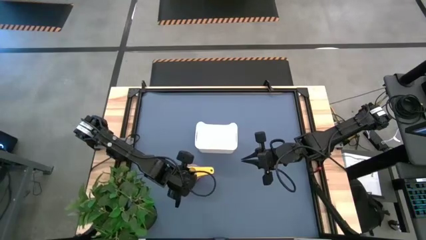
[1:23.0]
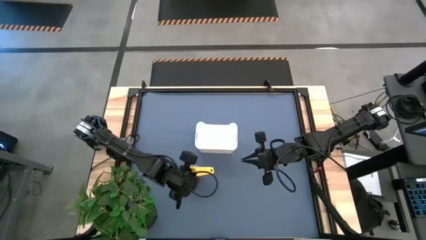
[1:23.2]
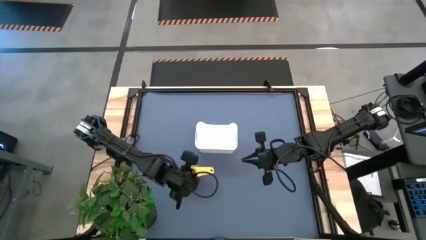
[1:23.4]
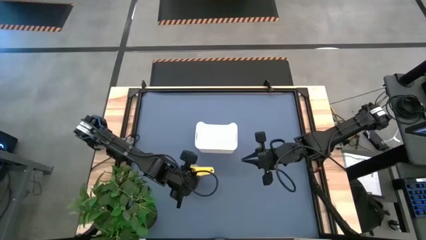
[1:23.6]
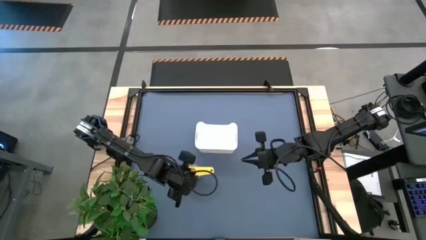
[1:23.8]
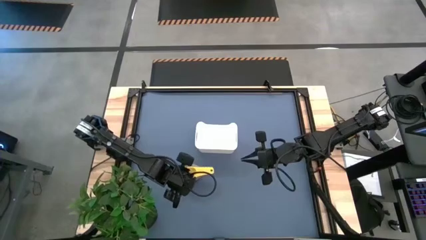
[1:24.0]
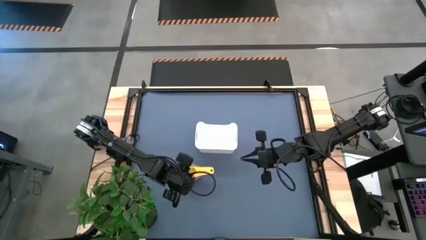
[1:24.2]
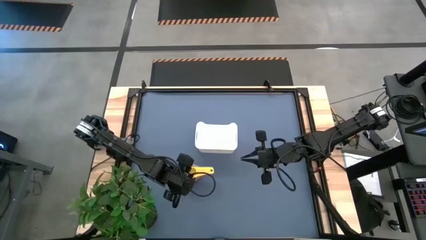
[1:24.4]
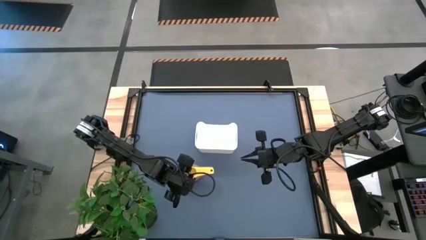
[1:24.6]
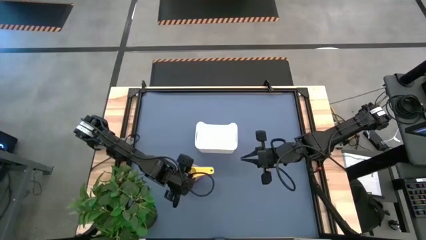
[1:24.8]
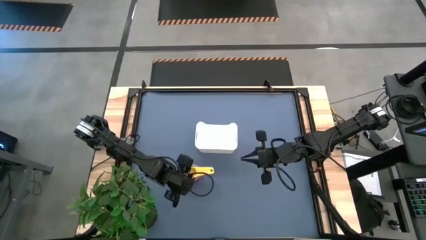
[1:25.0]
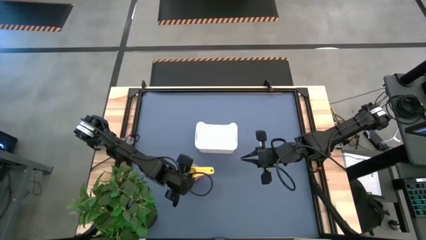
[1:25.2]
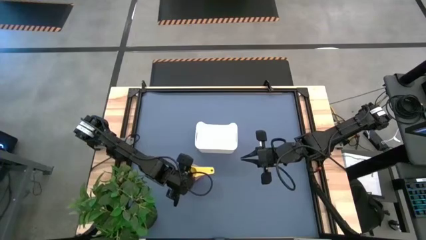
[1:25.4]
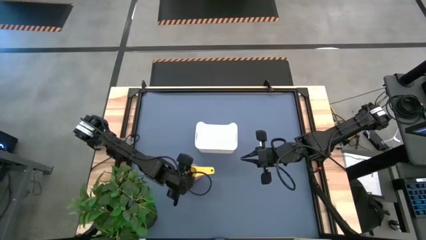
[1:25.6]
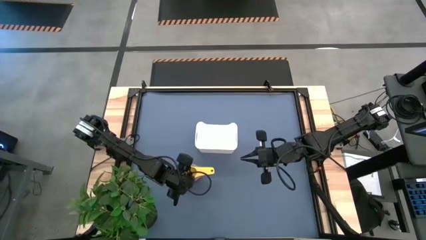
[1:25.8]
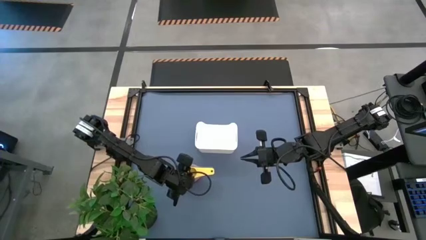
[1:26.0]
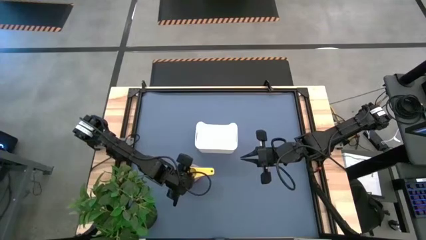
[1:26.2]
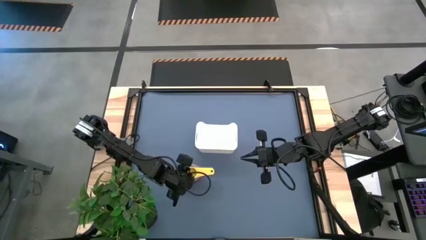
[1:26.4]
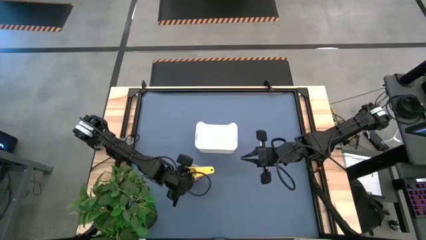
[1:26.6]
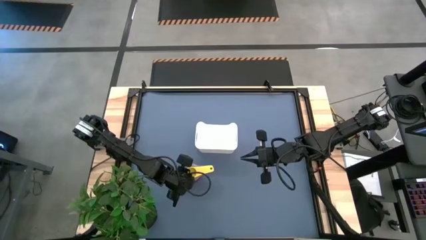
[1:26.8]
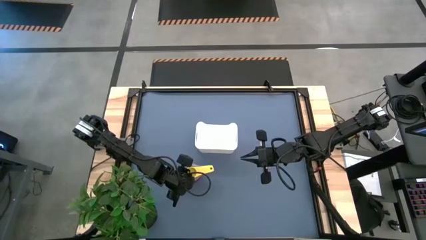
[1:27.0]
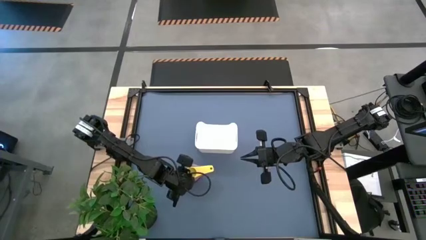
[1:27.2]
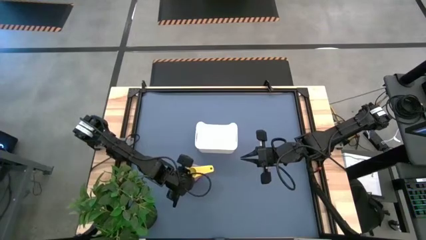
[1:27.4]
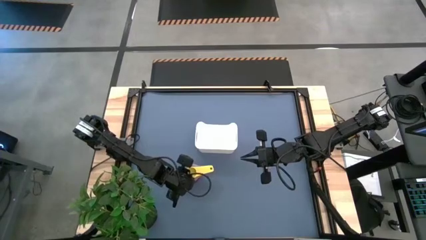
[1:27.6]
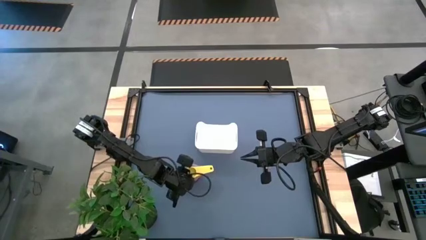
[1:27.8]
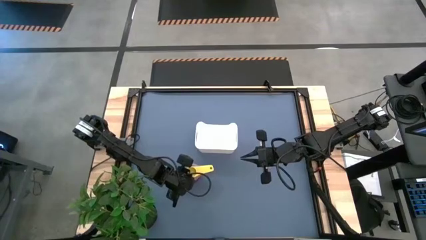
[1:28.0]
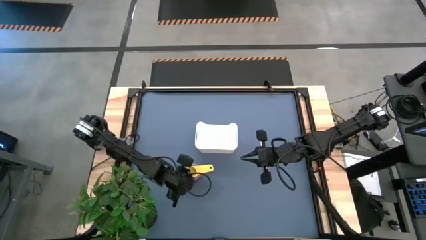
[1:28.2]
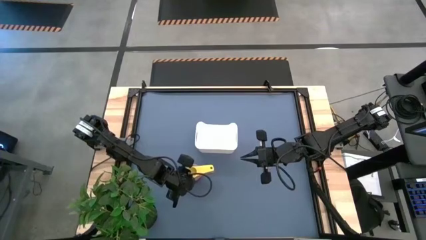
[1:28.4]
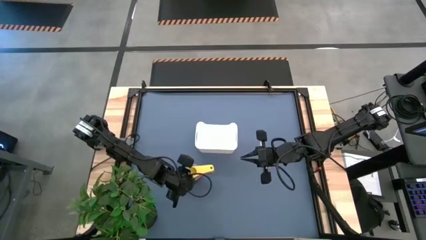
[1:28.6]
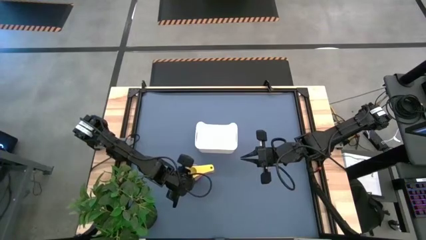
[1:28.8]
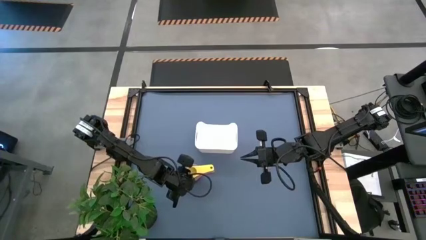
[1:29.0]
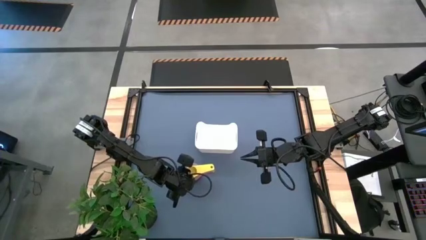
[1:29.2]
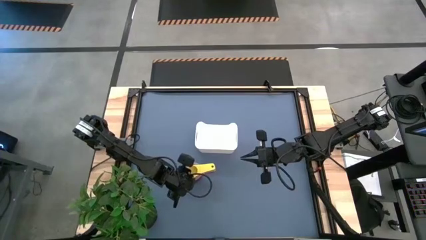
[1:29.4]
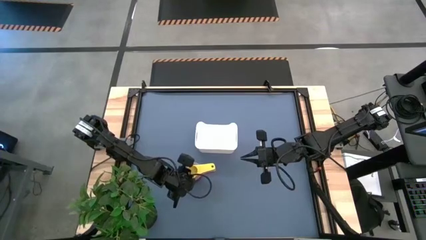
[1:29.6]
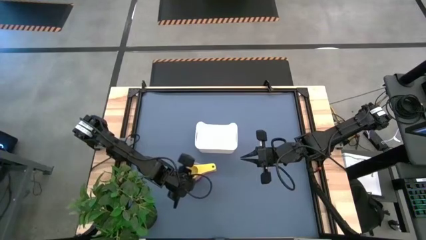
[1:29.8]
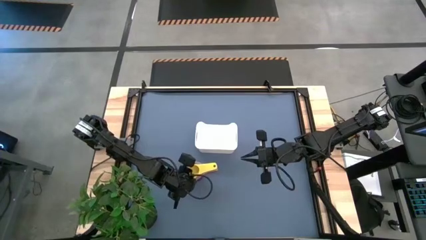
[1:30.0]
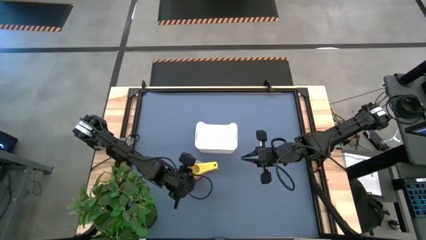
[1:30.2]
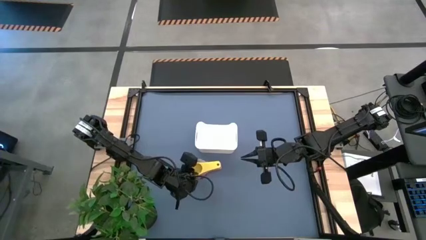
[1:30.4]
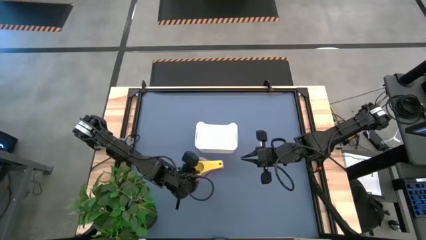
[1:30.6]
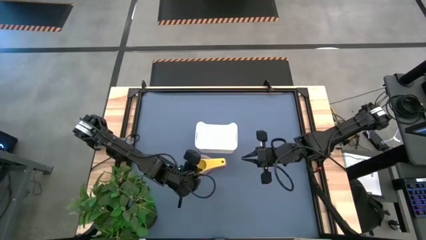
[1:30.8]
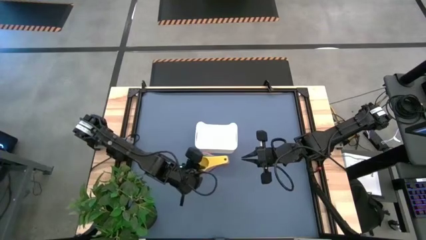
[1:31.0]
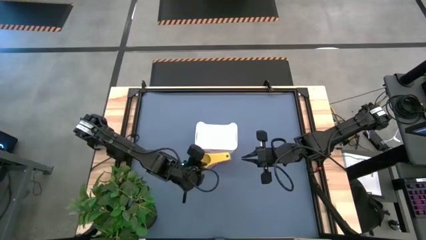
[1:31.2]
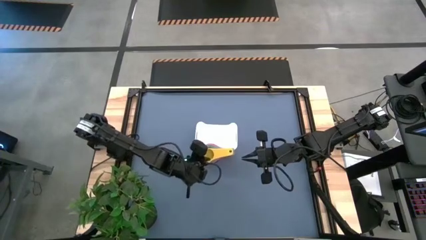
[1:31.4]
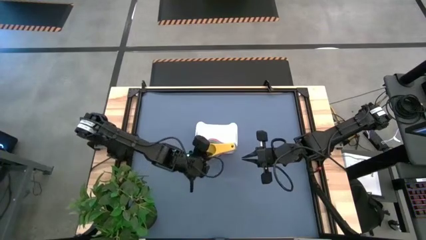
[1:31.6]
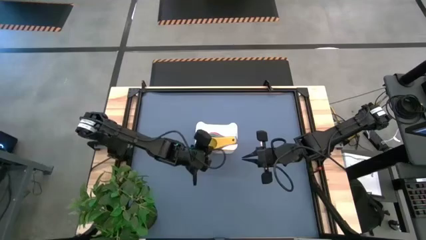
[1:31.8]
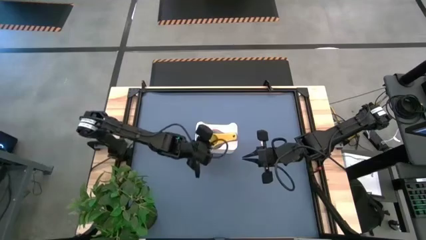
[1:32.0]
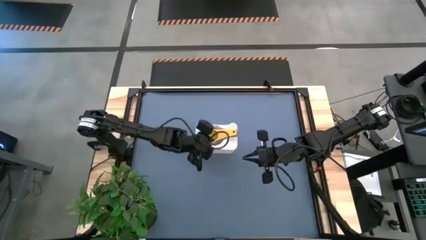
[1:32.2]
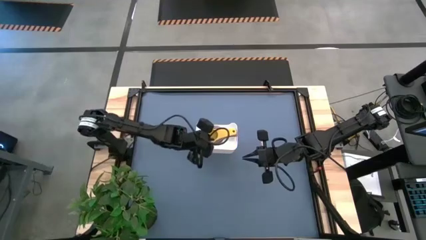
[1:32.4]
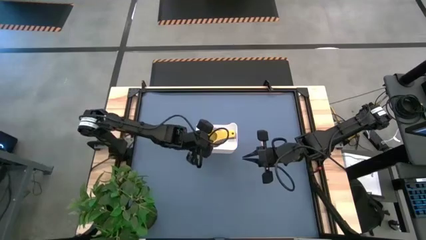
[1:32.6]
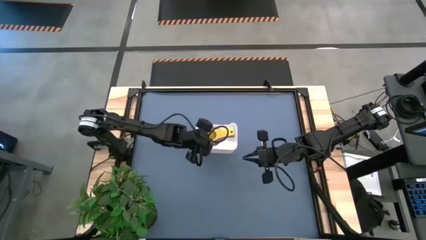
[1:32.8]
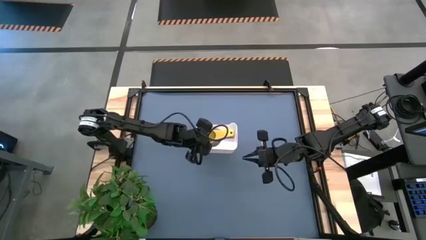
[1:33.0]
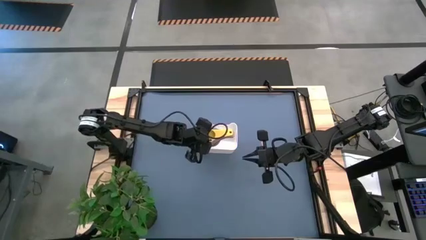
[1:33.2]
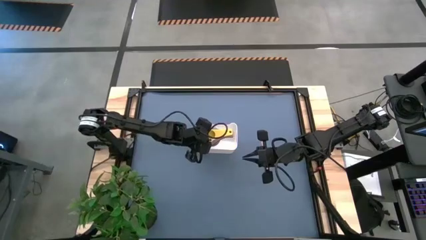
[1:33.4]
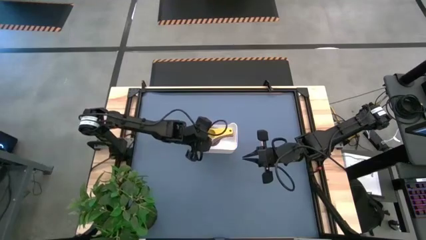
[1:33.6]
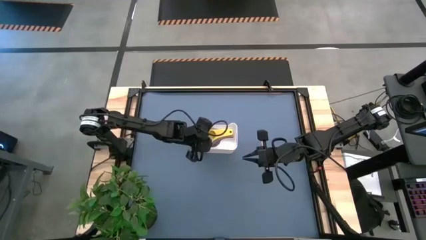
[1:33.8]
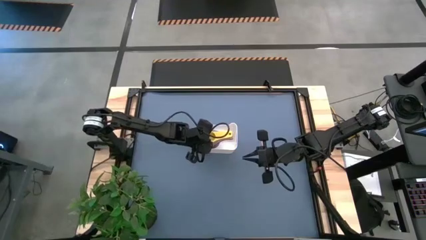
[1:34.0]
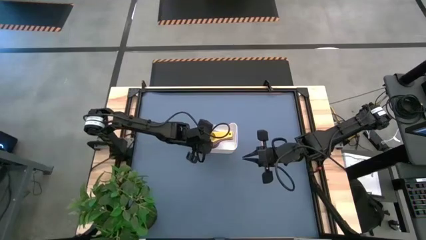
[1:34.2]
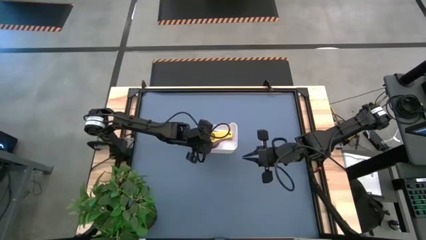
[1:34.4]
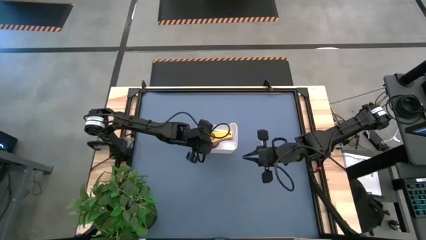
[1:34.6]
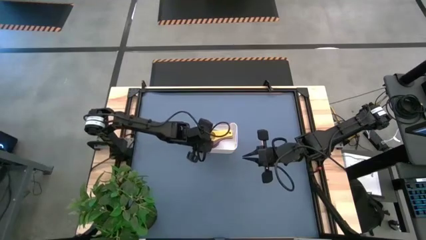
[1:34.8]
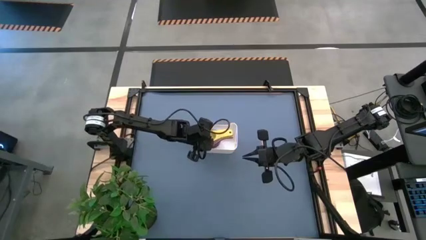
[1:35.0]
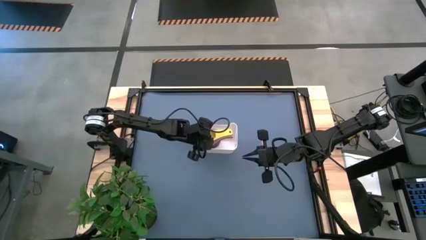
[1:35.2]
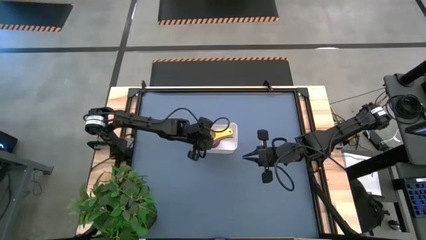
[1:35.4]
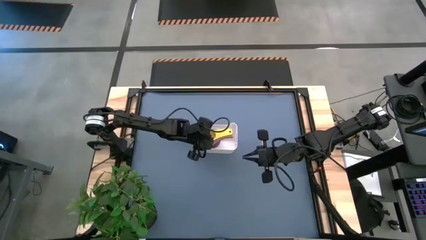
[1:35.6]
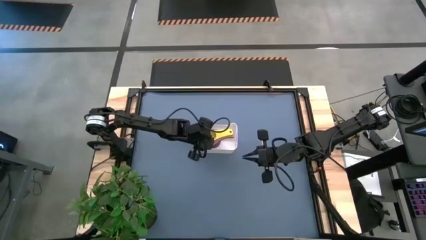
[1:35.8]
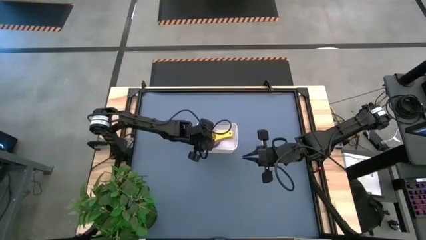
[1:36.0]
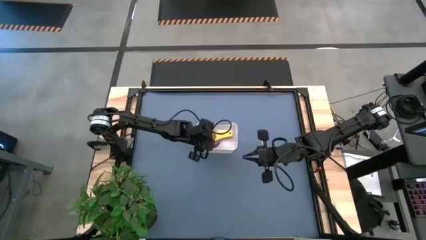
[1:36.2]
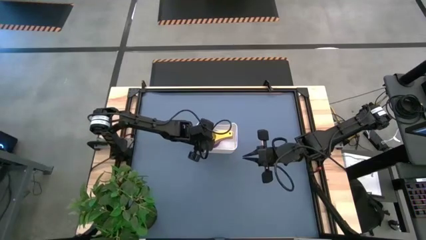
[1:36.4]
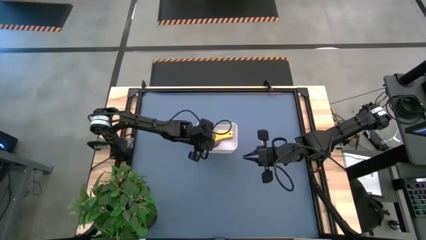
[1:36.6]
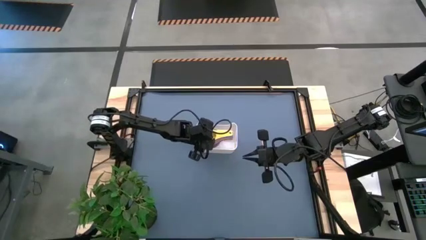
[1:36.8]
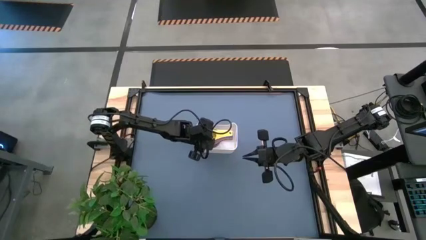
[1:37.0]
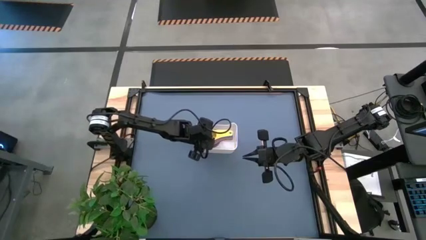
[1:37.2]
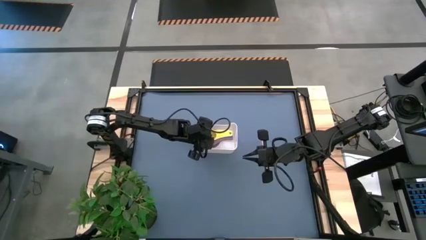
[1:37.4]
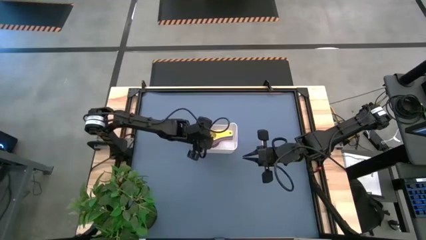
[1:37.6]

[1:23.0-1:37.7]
Task: Nest measuring cups in basket
Put the stacked measuring cups into the white bin

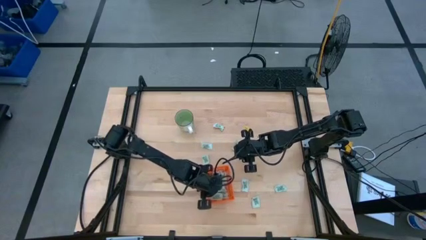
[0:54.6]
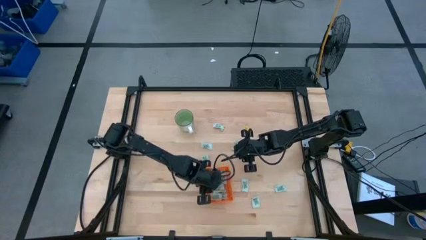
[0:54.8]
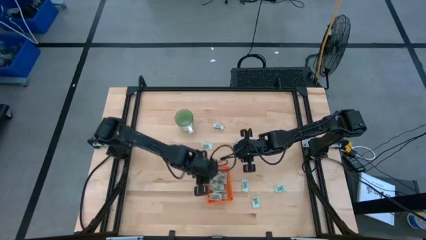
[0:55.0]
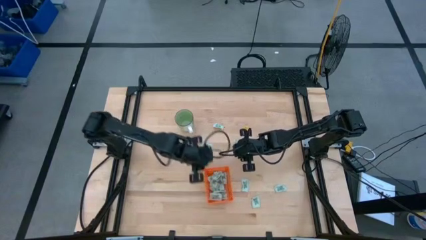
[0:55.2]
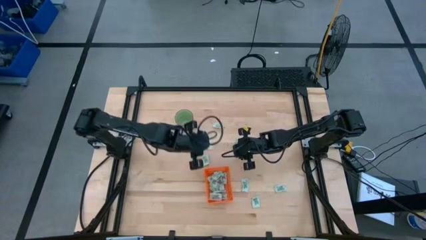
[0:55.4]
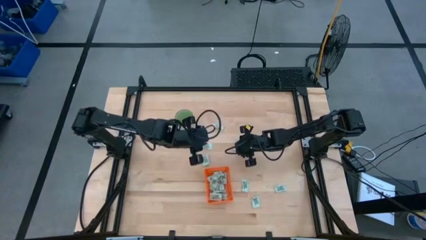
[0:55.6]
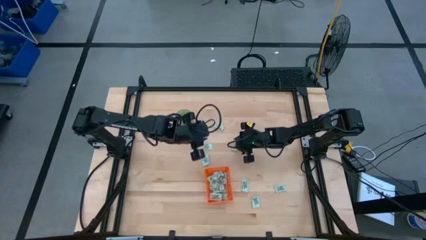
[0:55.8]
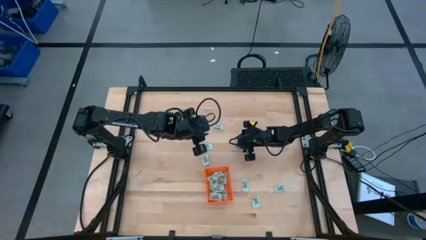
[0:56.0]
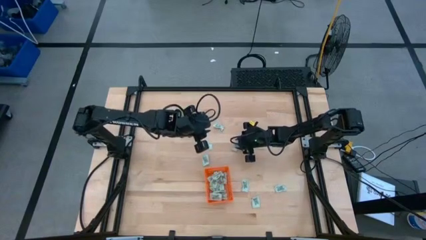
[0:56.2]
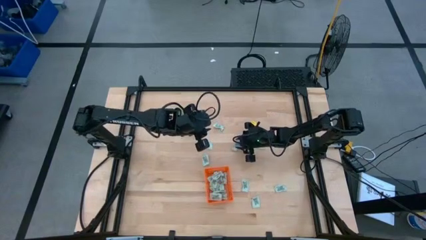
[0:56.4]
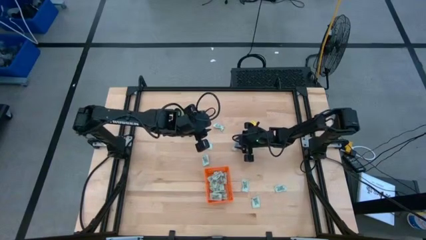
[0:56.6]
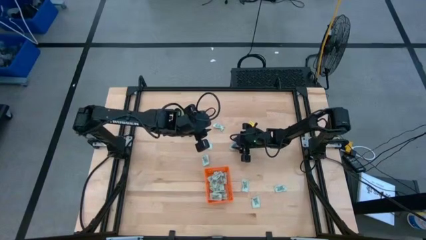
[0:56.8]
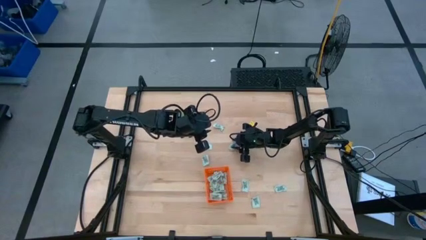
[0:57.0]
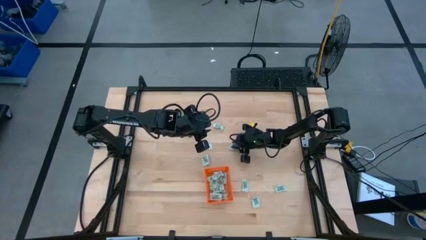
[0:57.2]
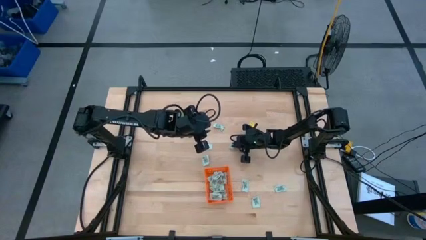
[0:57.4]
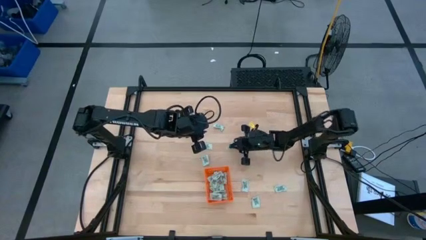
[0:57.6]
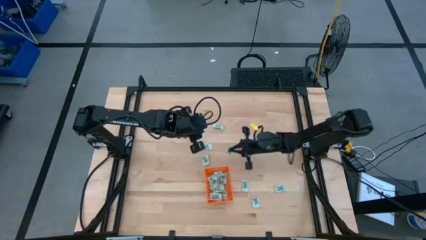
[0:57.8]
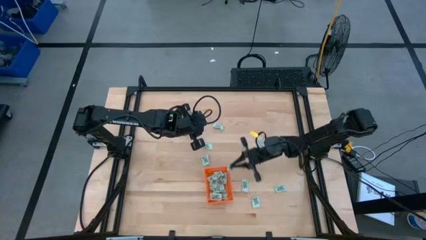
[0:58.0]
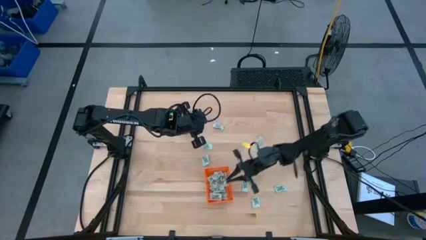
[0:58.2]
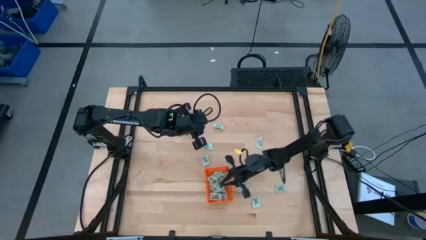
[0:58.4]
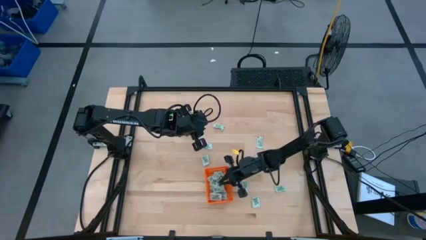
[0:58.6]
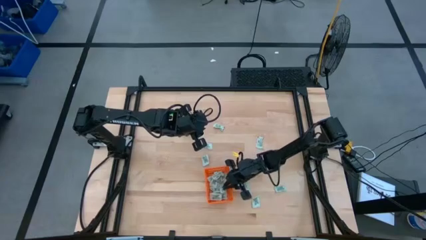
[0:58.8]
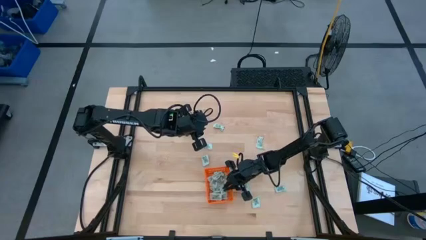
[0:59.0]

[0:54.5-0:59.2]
Task: Pick and place Stevia / Truvia into bins
Put the stevia packet into the orange basket
